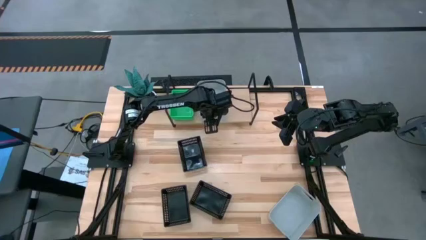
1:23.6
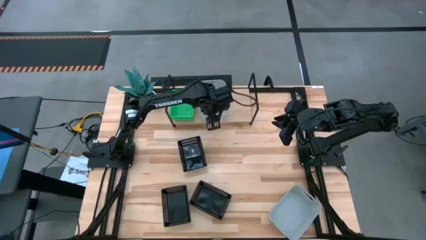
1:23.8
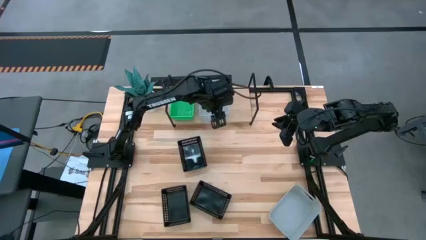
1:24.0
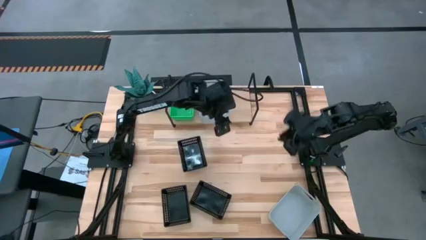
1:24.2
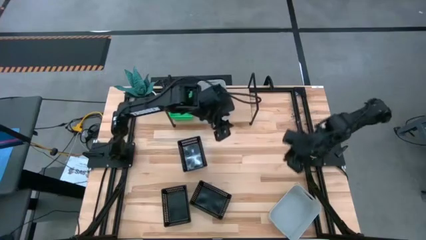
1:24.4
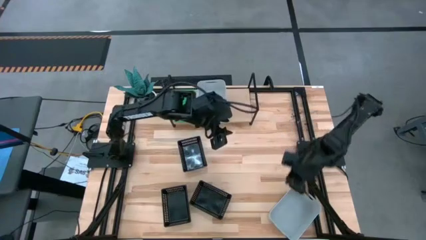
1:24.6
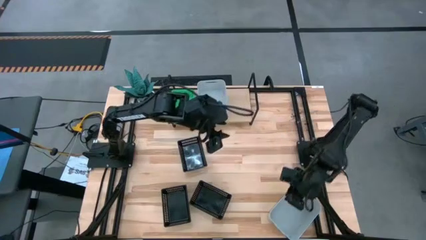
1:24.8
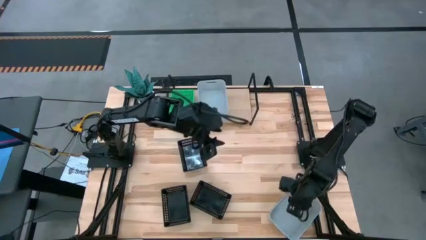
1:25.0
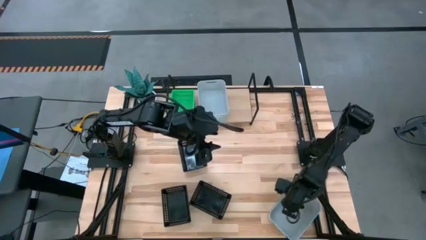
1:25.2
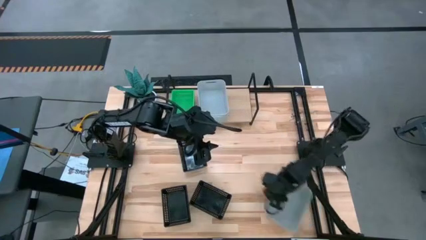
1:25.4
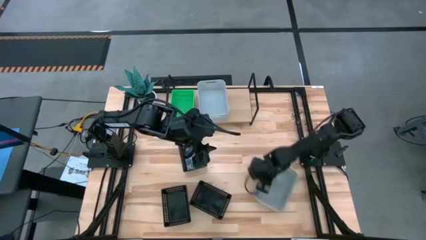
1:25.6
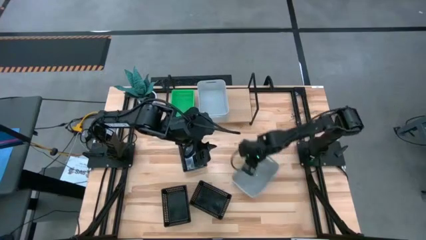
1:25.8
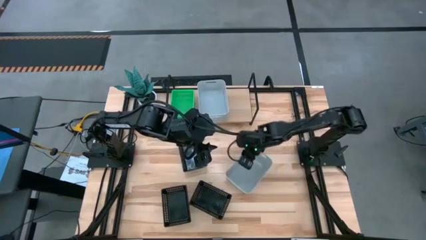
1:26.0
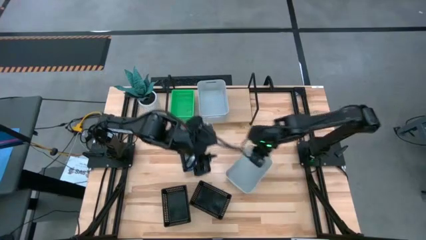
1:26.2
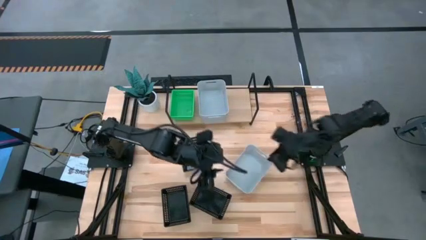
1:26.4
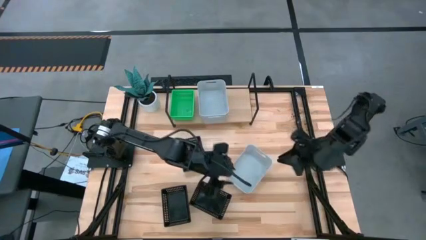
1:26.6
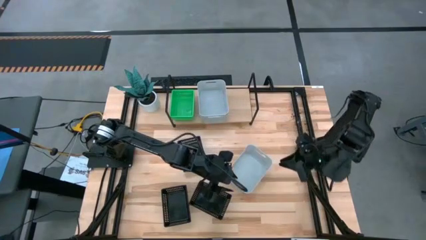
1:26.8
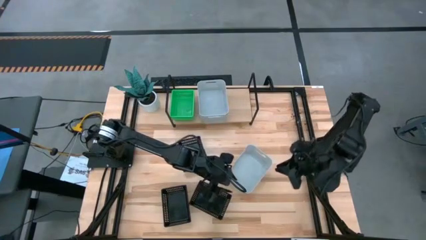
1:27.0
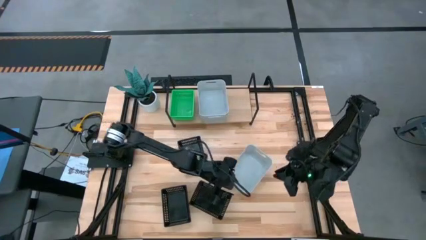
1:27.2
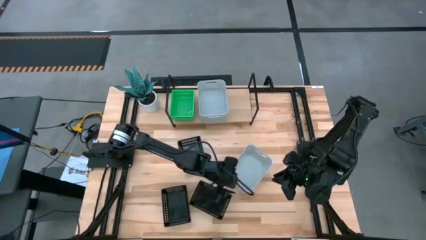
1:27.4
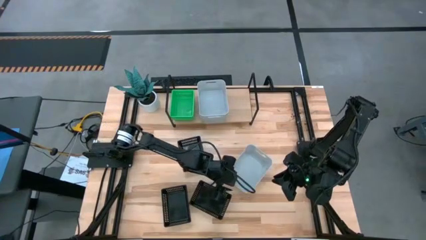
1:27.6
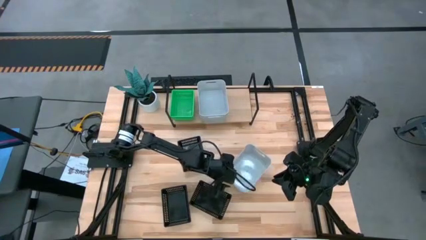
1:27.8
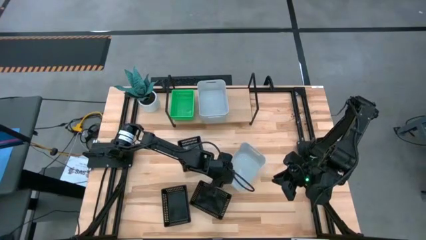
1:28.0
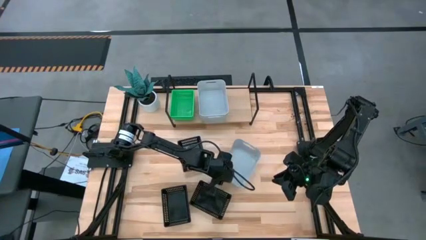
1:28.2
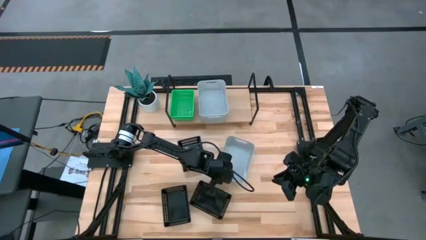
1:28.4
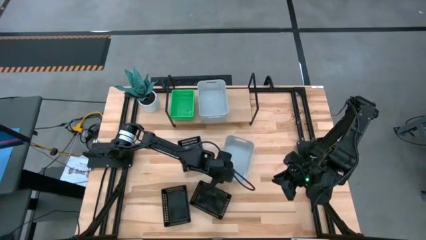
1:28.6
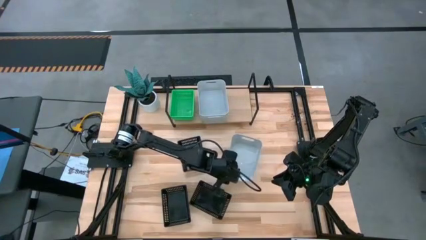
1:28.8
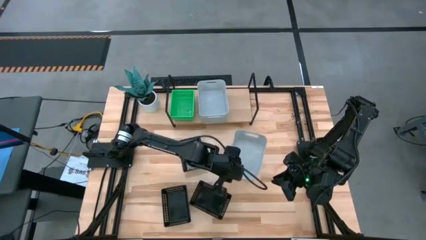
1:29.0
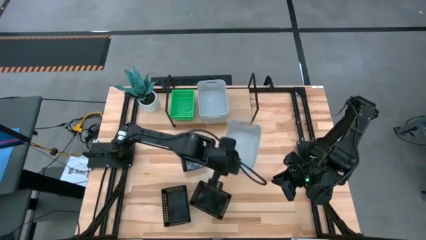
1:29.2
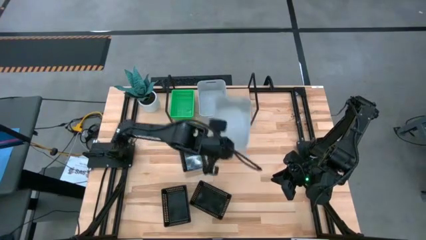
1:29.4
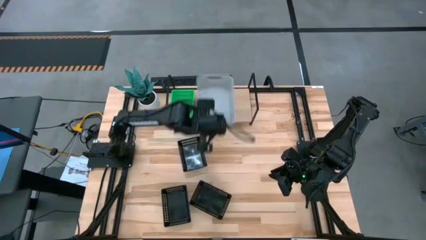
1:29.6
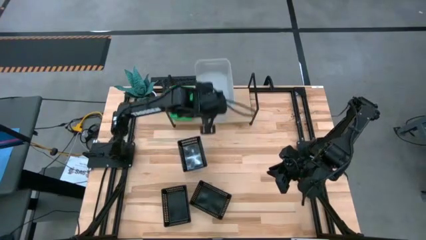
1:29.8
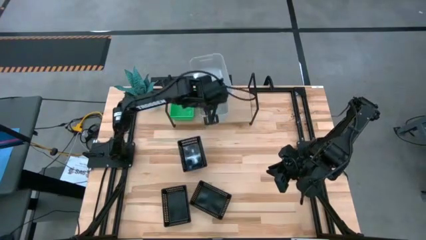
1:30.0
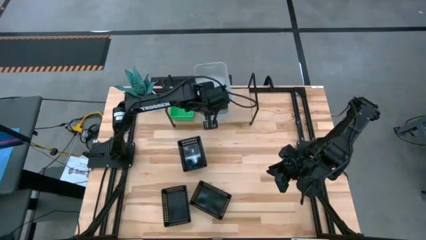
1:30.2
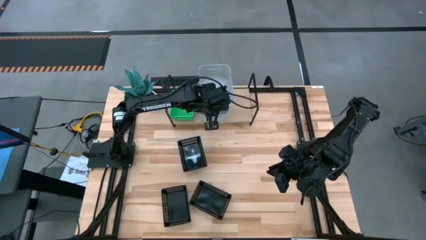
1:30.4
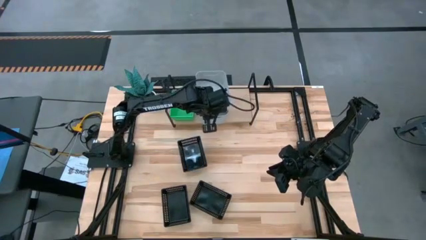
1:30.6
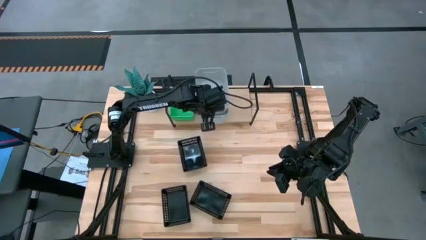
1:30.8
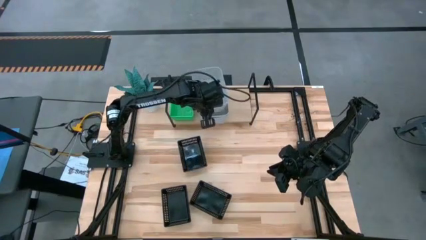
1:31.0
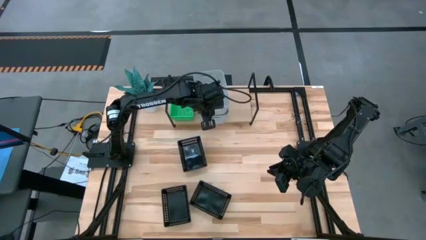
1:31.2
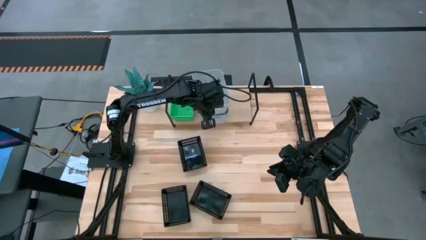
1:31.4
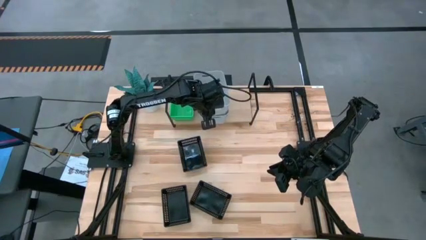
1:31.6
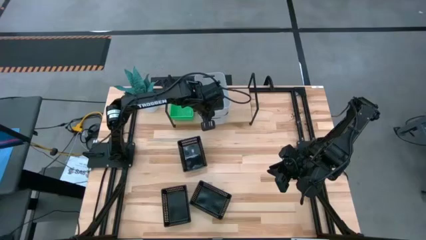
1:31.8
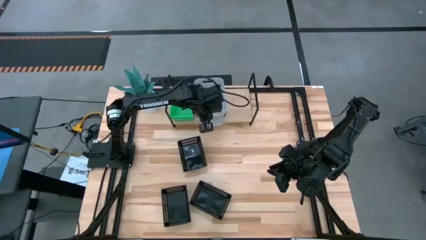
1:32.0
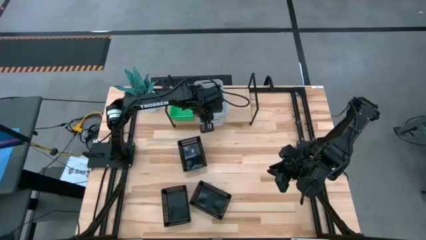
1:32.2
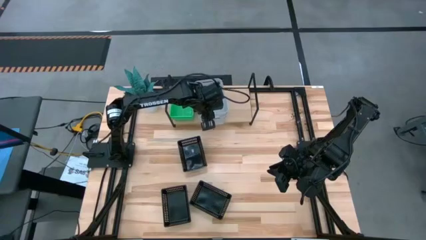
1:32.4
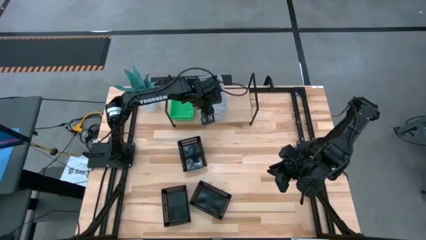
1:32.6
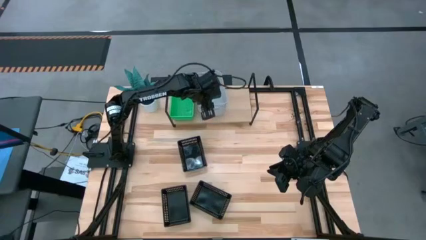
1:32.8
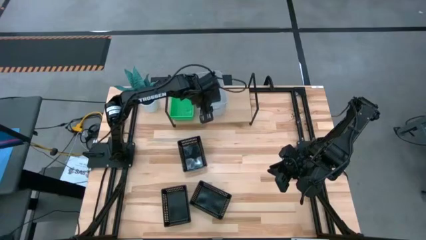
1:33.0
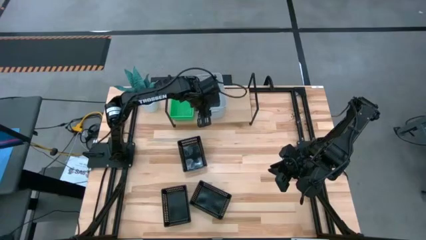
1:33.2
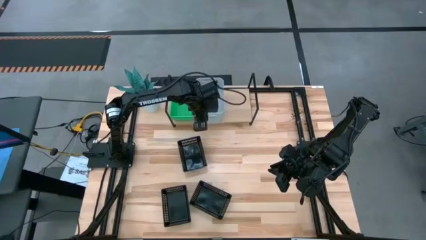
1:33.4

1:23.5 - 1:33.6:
Task: Stack baskets on shelf by color
Stack the gray bin on top of the gray bin on the shelf

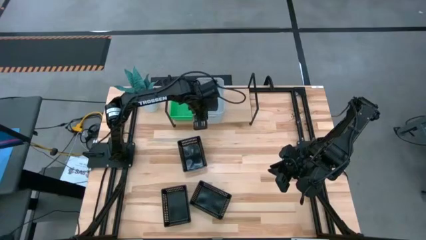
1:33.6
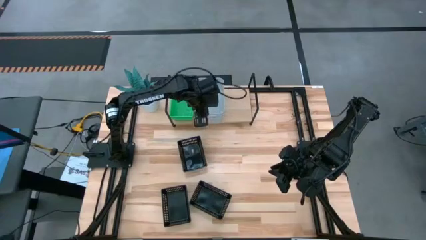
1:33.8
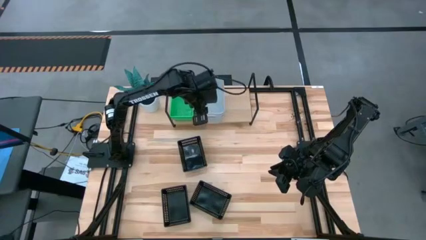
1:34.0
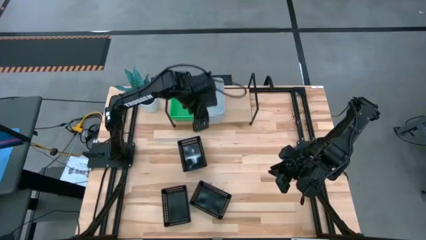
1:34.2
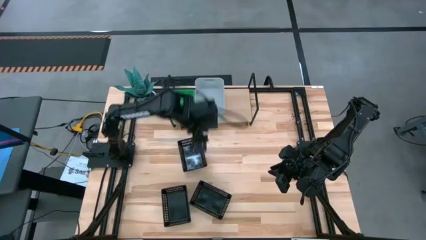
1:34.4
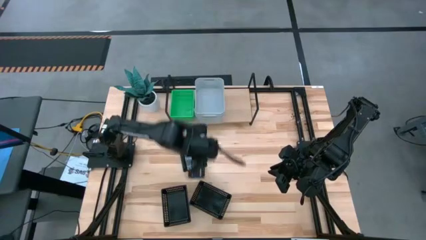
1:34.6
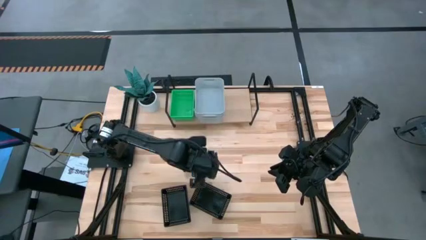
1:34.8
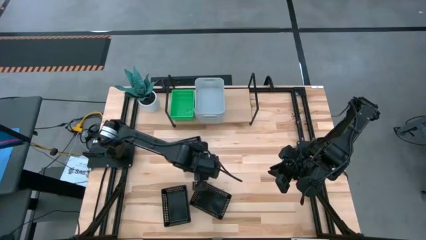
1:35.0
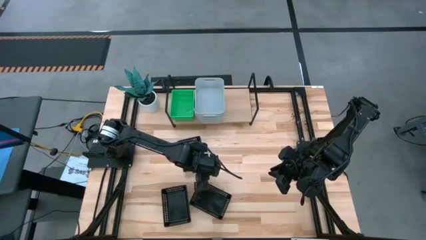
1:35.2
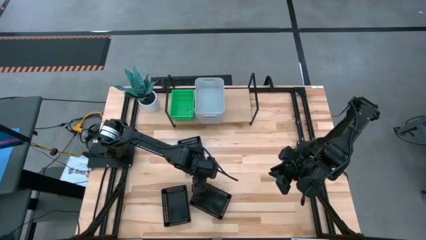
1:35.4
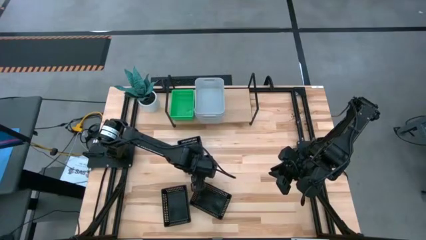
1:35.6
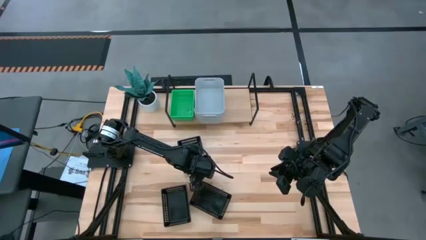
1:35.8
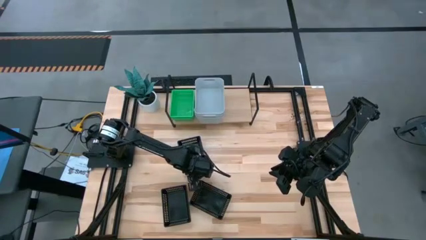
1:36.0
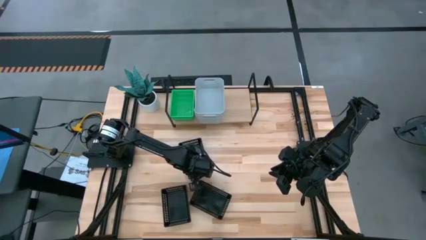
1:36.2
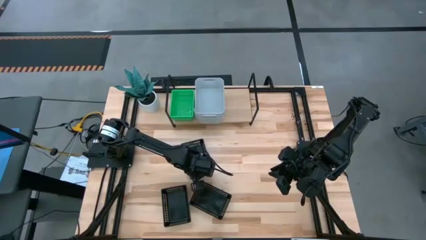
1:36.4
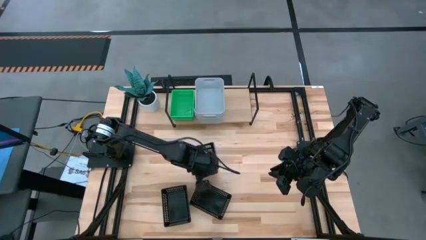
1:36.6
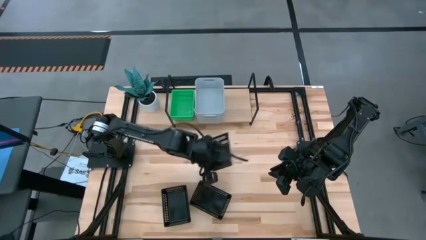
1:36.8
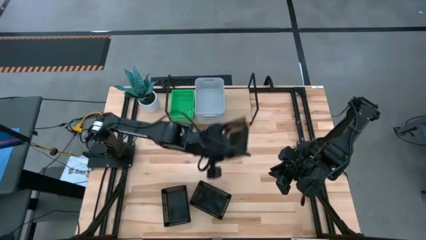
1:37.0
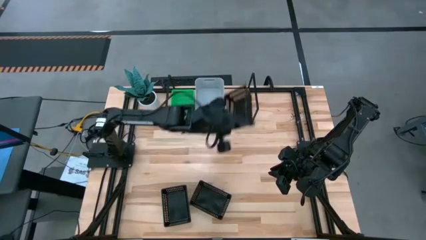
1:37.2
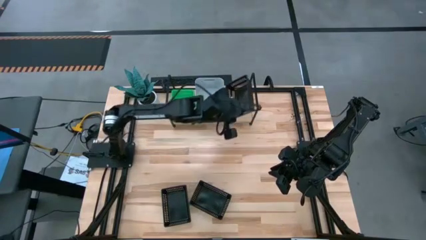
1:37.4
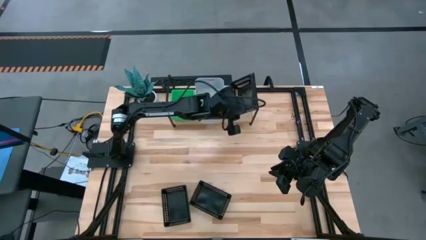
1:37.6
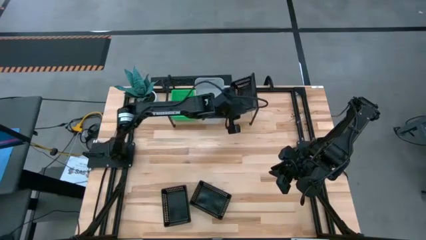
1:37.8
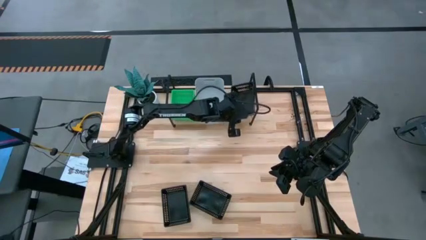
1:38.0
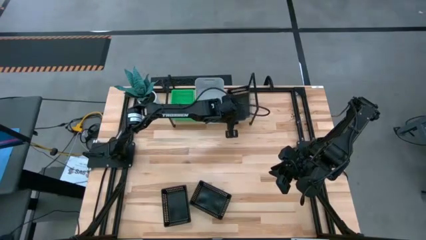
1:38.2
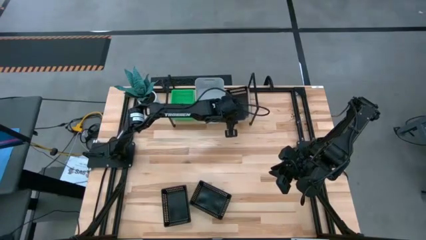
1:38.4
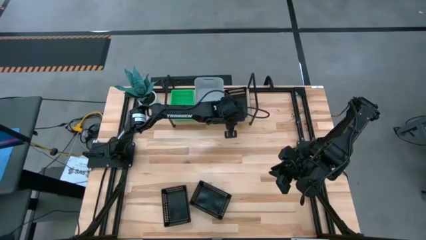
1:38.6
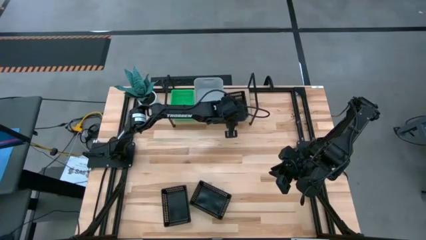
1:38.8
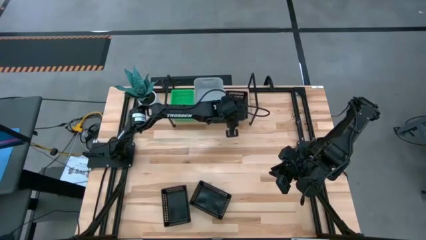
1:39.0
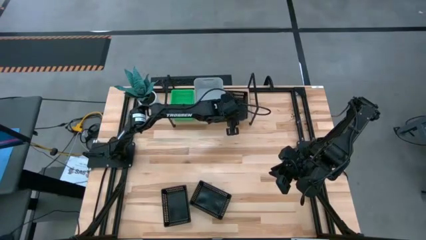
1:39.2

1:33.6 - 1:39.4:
Put the top black bin on the shelf
